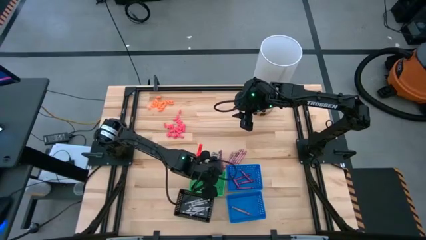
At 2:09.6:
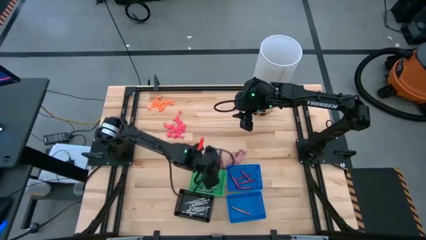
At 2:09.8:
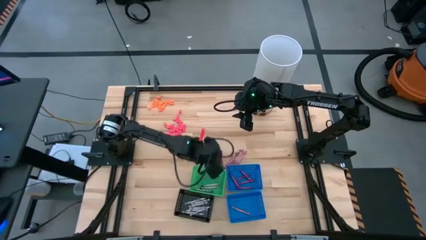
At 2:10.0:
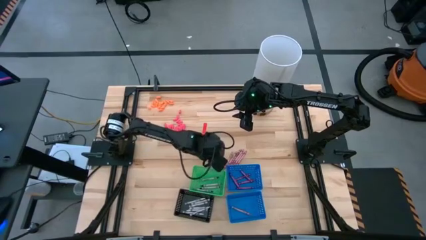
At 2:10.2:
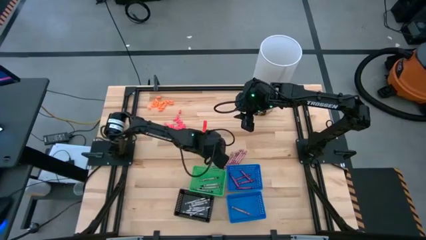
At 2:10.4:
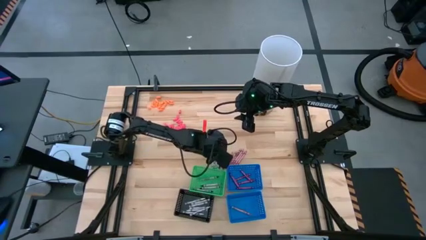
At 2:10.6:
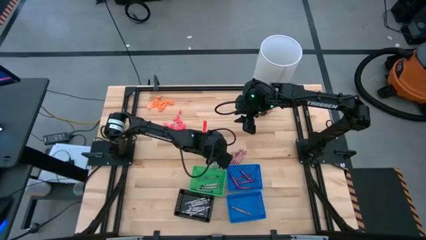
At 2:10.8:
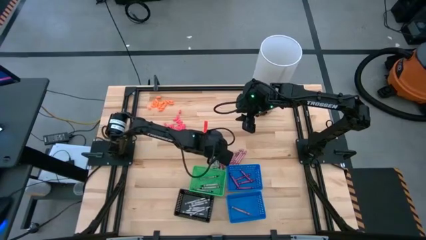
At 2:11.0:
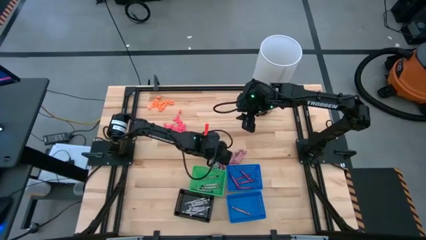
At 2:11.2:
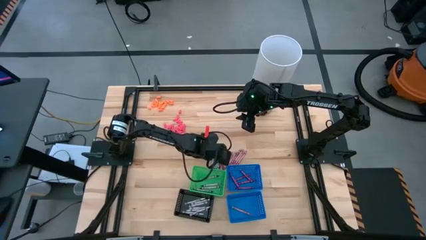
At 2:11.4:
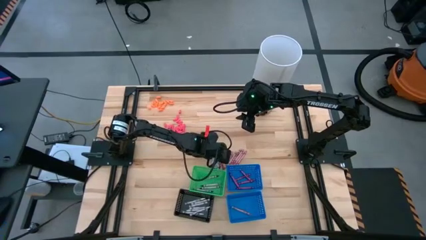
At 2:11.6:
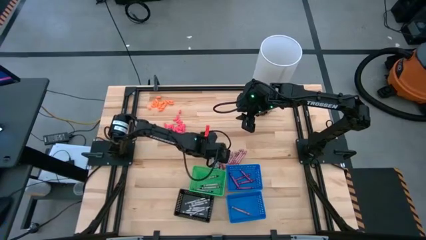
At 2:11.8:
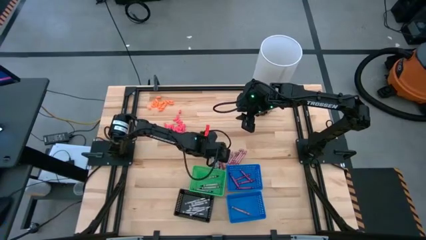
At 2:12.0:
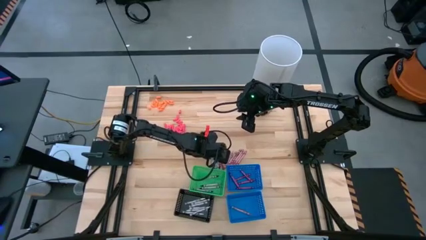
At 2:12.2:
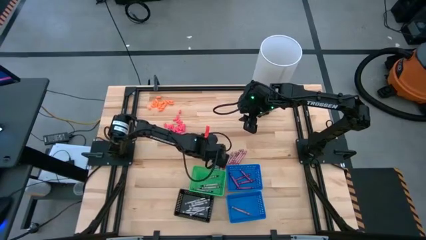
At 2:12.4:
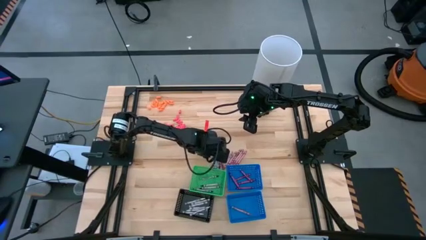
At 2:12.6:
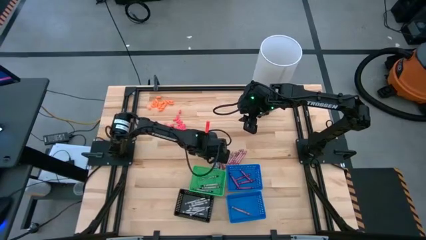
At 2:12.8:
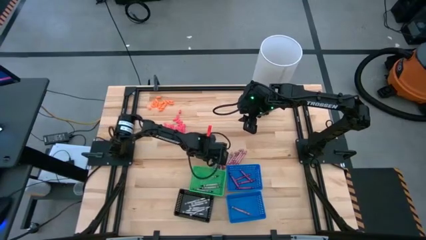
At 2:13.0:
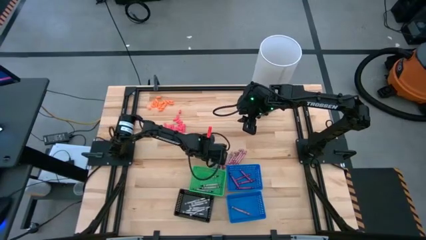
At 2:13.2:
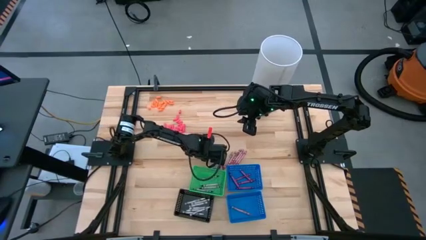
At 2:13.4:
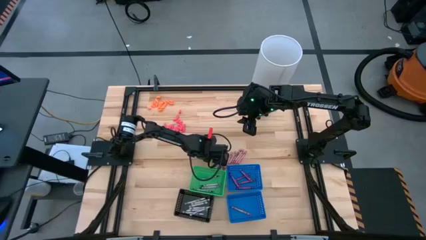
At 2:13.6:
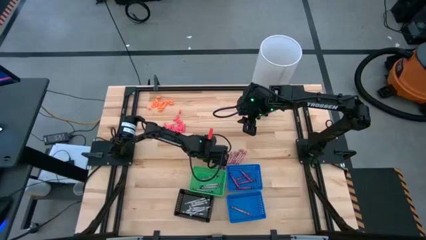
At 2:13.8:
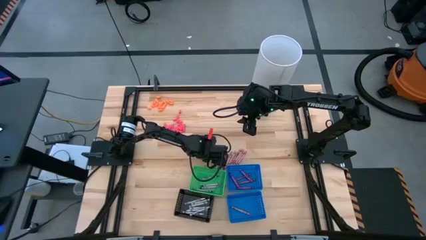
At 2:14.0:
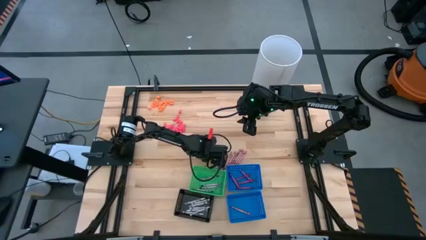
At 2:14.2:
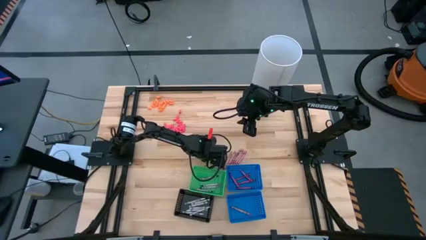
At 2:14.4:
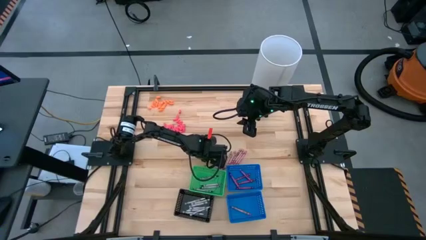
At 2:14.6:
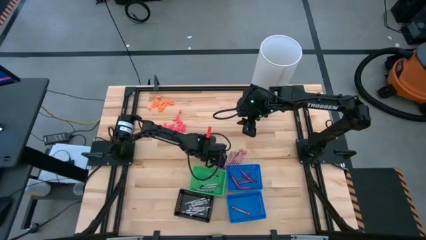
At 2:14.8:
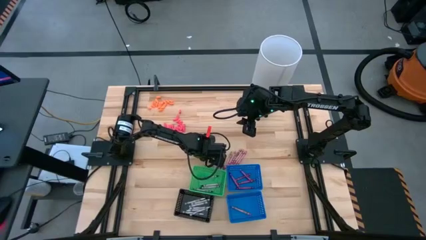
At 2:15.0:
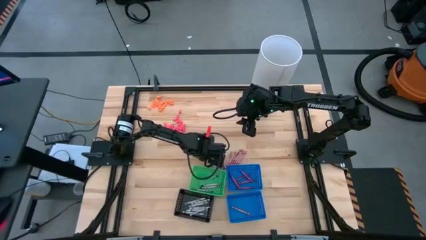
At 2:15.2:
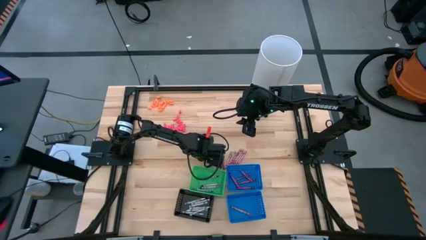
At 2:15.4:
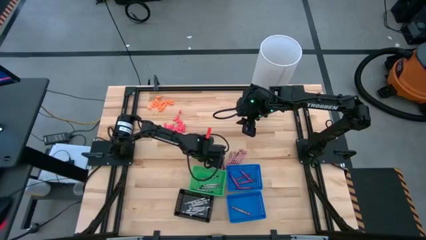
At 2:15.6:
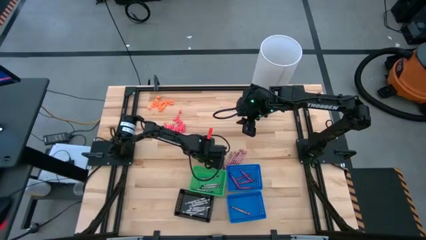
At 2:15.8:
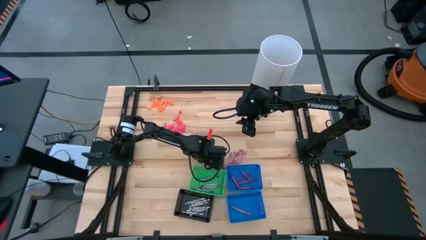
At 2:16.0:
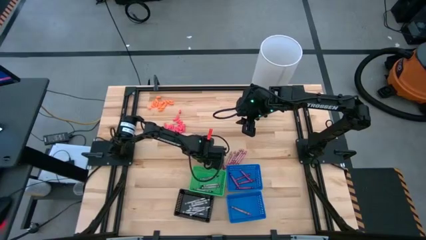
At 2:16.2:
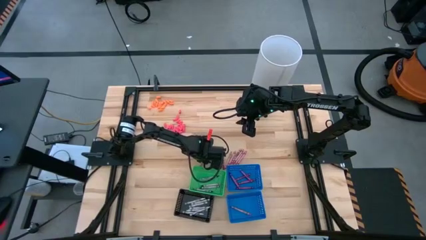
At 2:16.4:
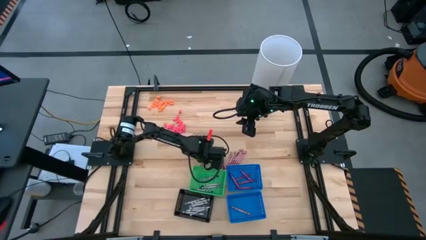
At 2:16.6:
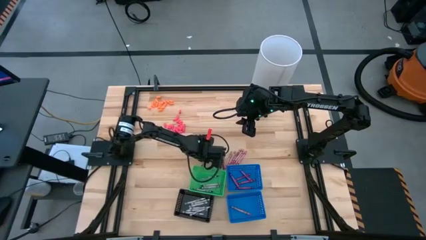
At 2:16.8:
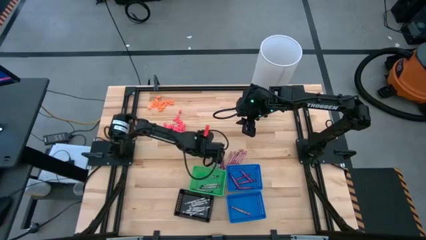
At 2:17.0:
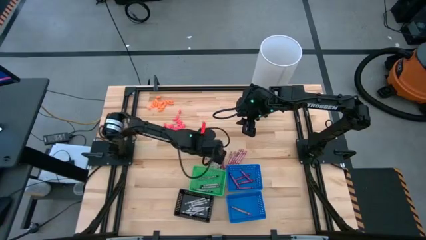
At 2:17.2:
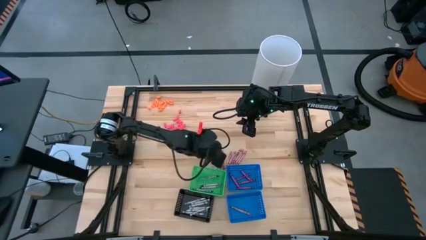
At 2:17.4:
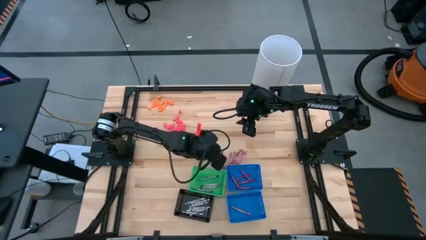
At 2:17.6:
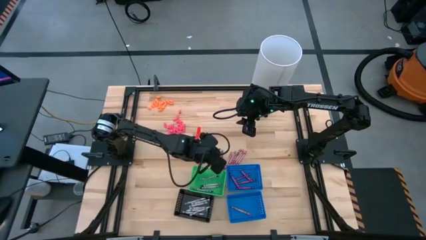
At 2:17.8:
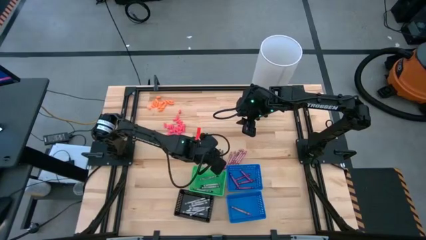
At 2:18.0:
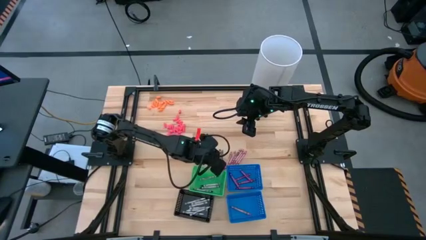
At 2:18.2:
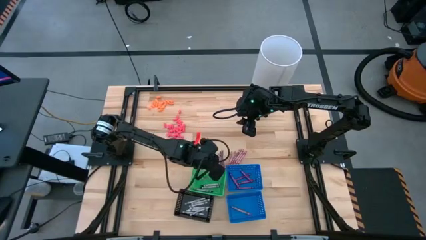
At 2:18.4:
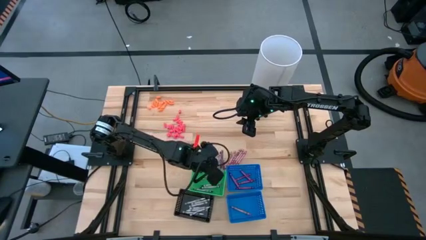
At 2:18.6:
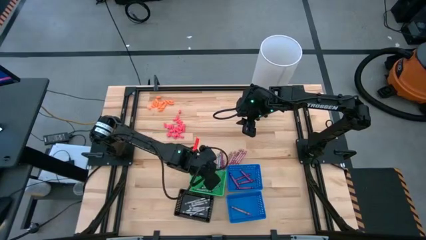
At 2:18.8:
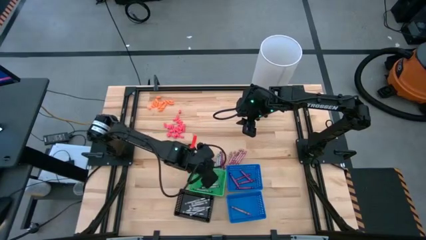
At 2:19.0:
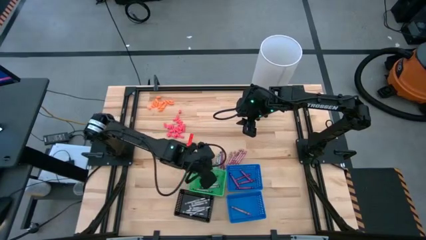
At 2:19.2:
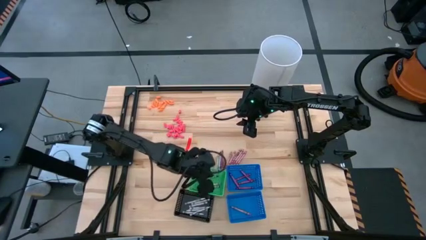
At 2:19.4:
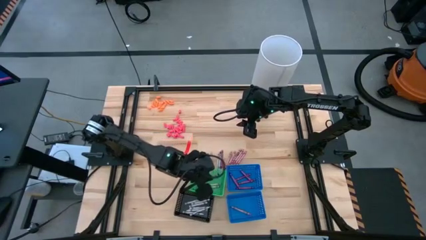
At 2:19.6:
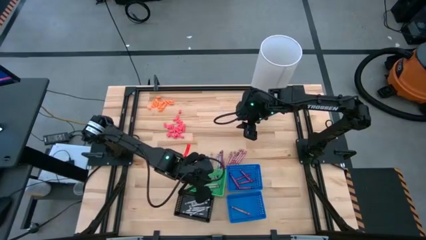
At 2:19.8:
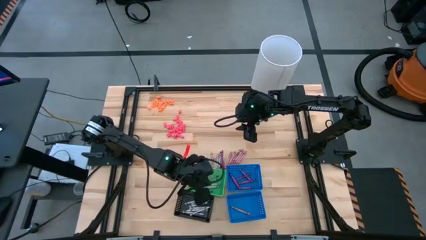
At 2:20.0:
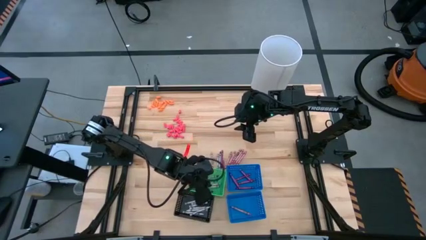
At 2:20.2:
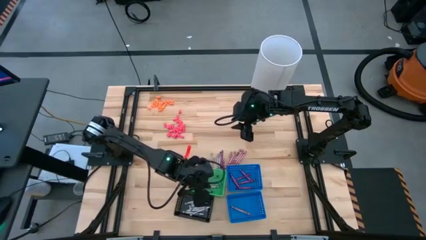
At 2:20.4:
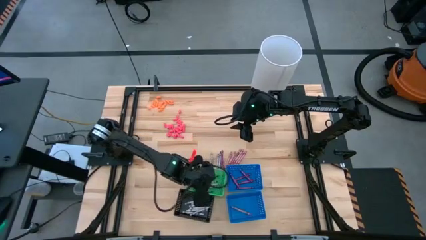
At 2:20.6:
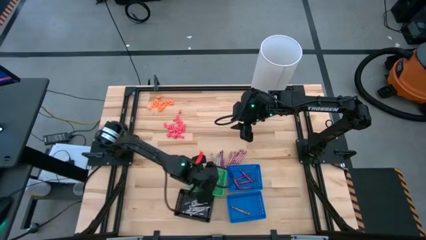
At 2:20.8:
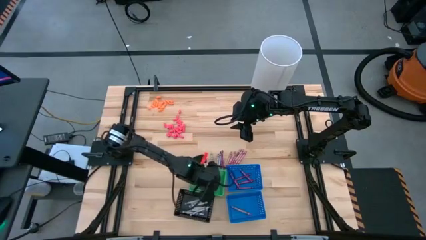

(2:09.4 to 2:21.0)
Task: Sort crayons
Put the black crayon into the green bin

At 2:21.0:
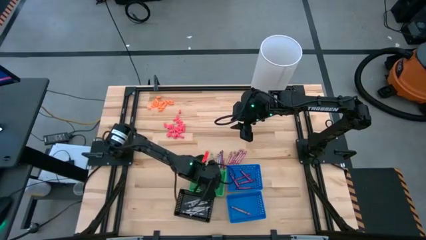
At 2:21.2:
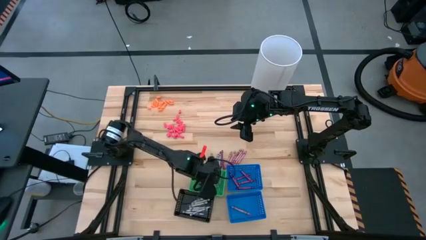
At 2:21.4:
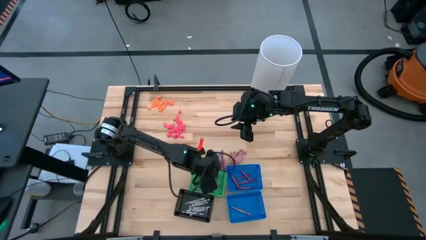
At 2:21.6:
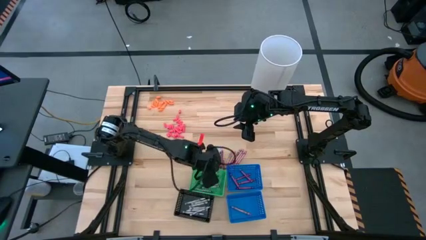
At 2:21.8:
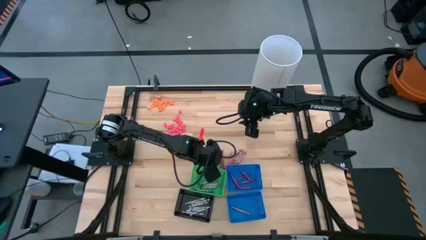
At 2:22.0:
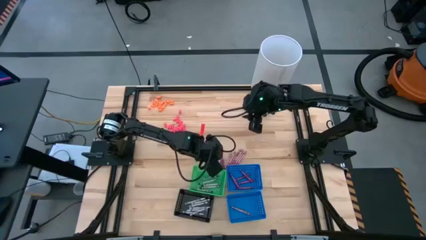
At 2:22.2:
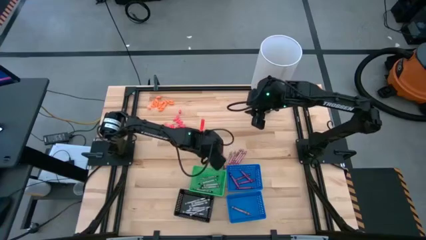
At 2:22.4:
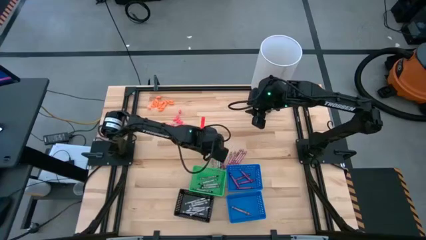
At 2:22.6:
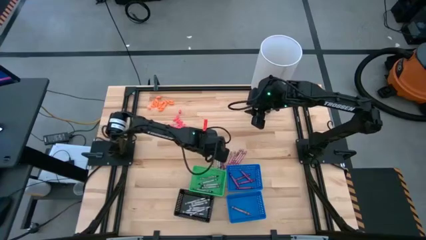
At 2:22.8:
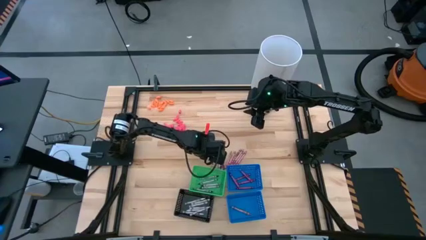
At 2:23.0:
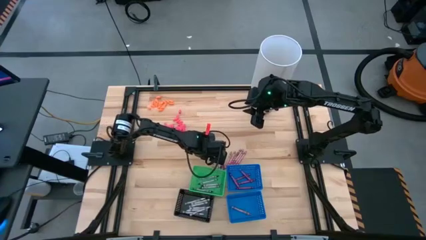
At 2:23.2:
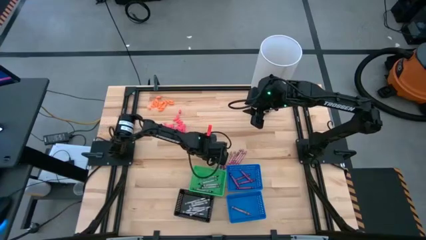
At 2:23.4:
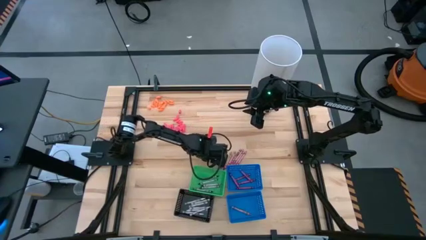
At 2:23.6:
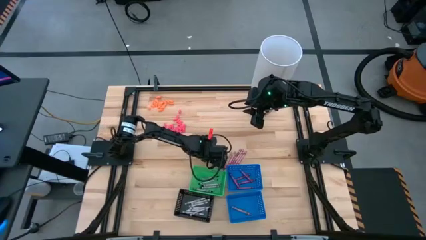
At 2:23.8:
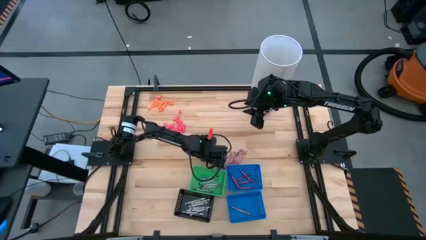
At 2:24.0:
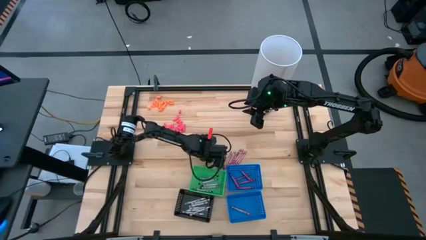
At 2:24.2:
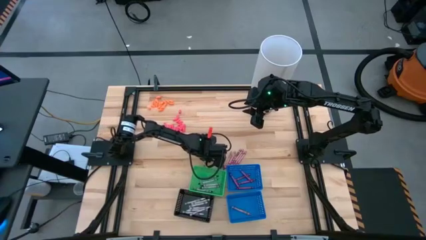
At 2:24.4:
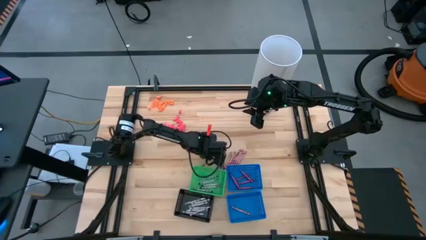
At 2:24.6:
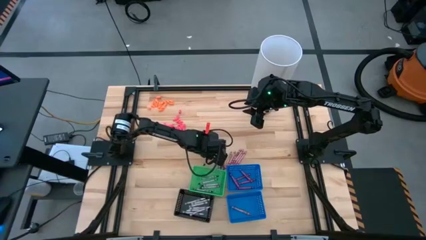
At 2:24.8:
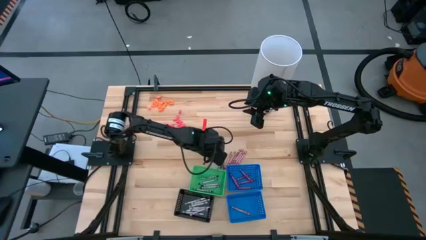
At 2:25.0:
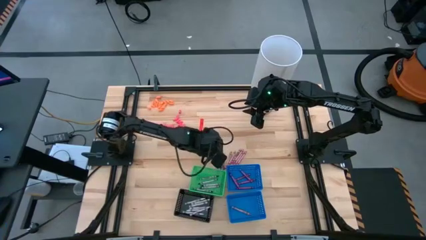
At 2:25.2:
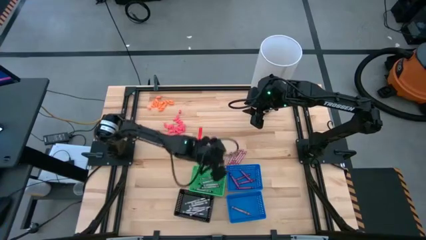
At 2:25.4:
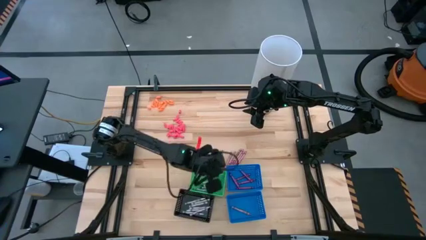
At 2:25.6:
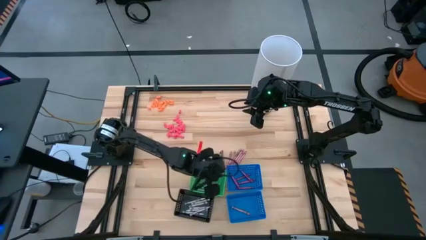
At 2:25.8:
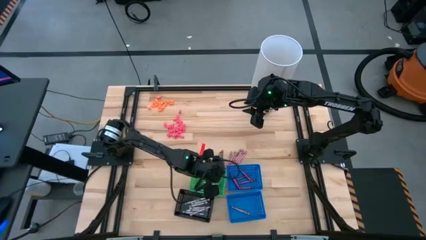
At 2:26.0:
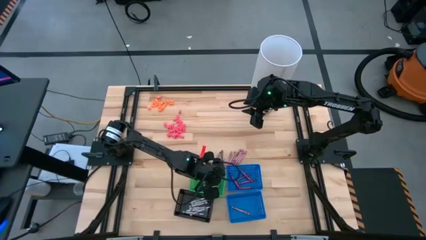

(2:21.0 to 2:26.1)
Put the black crayon into the green bin
